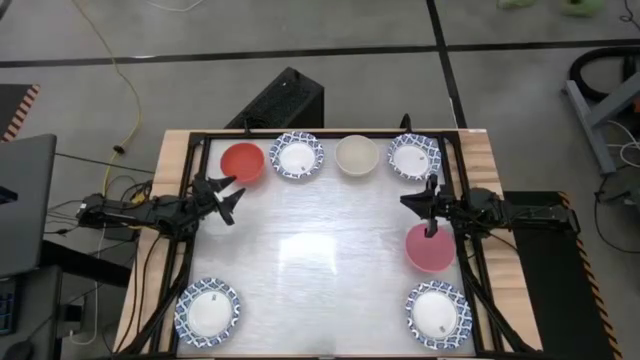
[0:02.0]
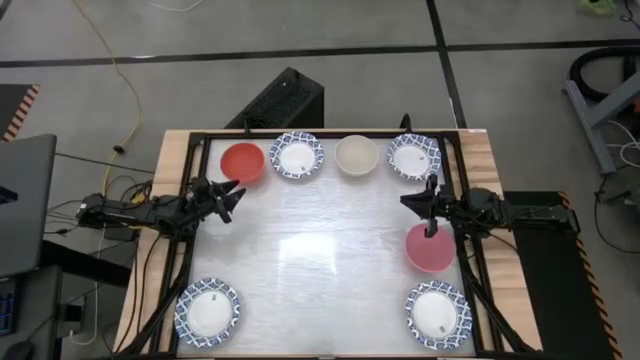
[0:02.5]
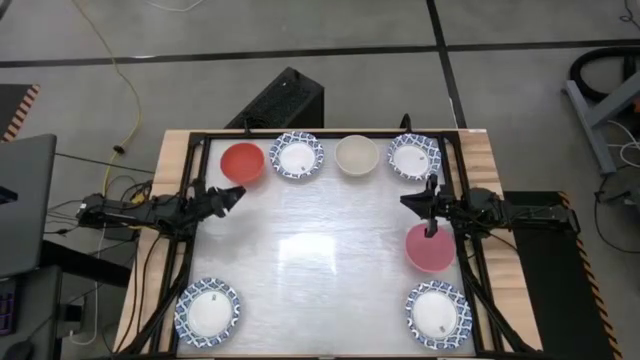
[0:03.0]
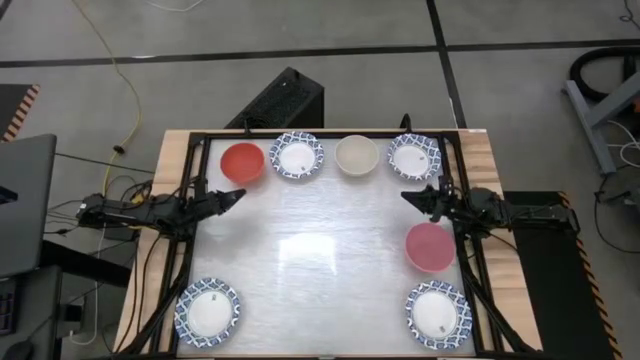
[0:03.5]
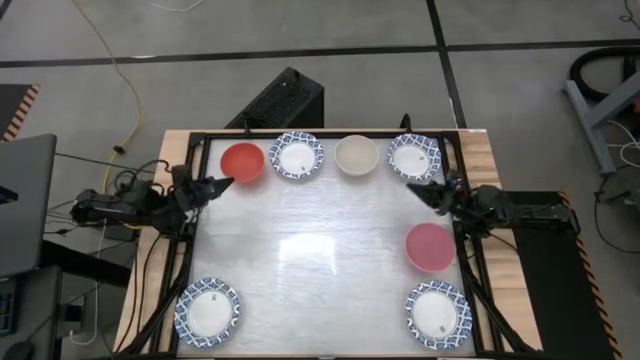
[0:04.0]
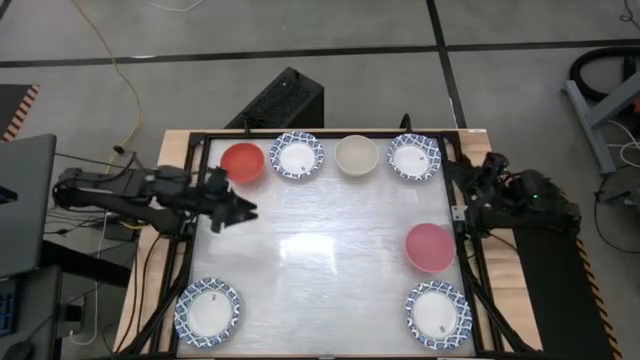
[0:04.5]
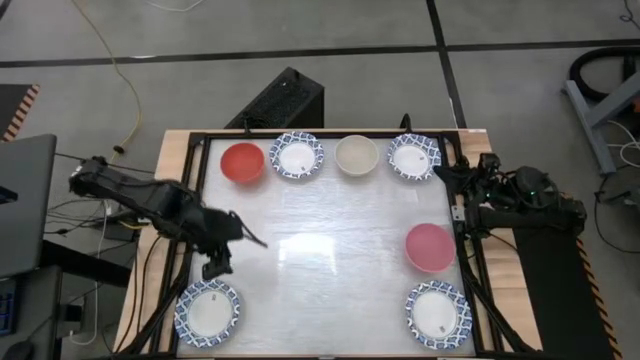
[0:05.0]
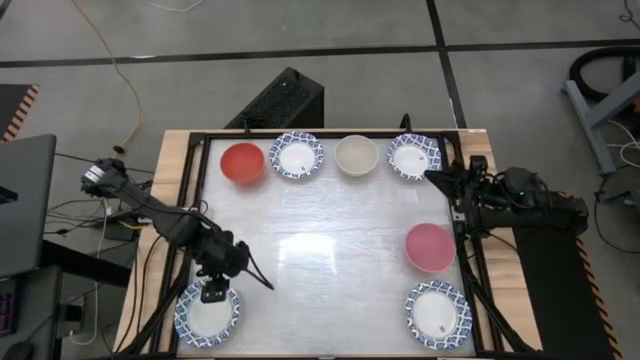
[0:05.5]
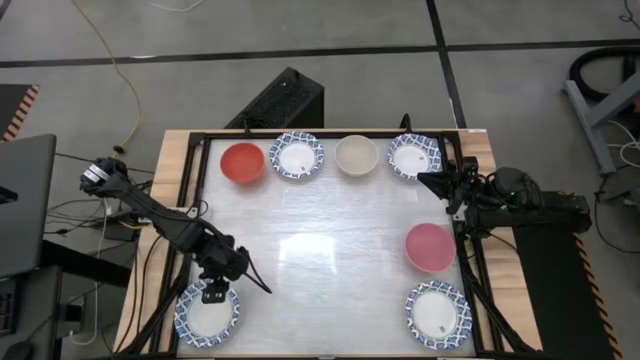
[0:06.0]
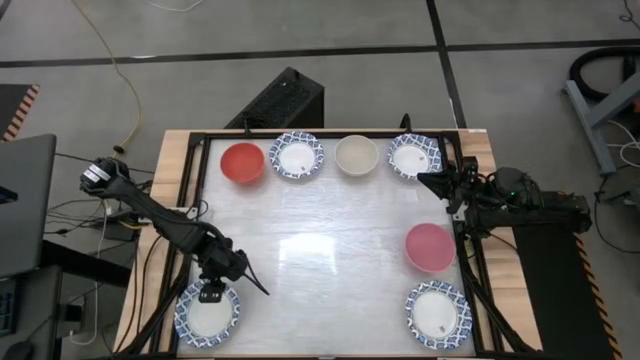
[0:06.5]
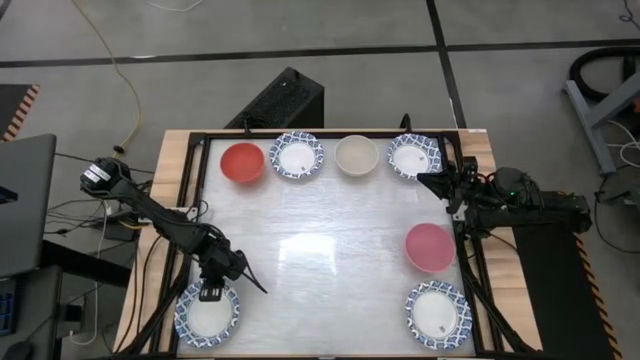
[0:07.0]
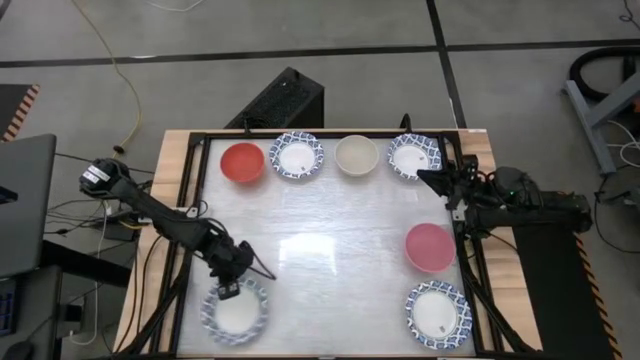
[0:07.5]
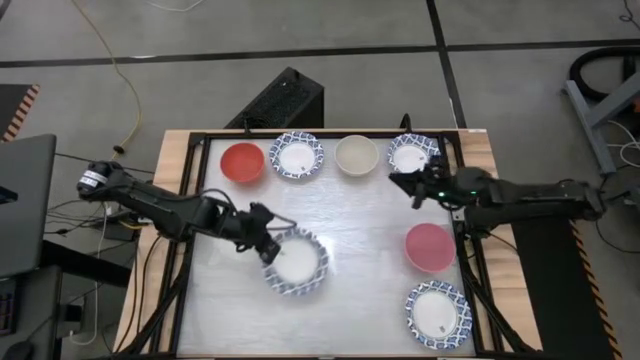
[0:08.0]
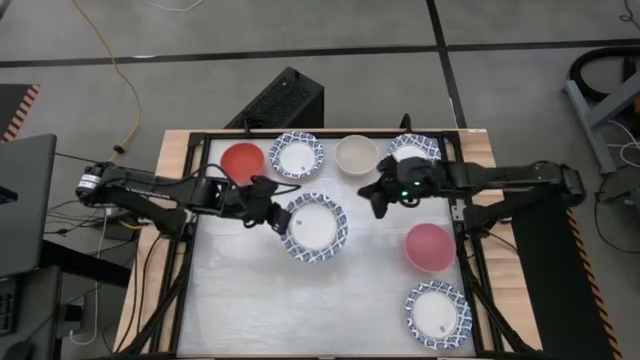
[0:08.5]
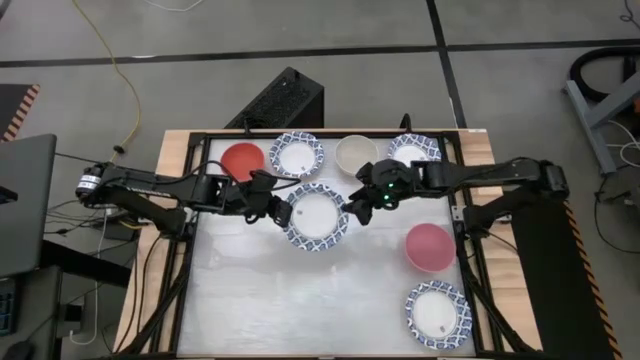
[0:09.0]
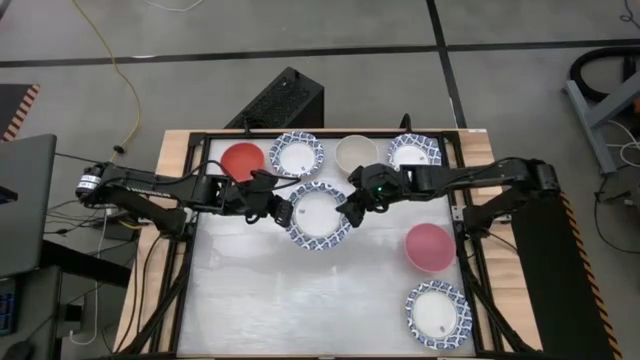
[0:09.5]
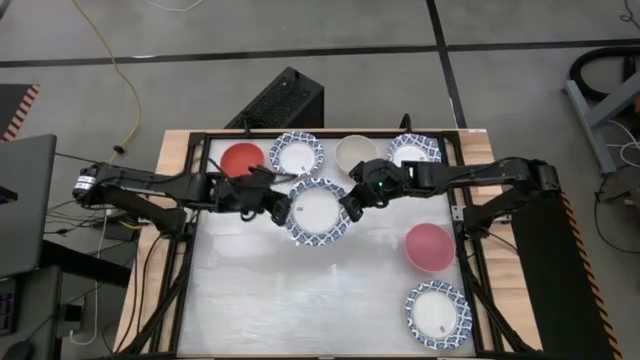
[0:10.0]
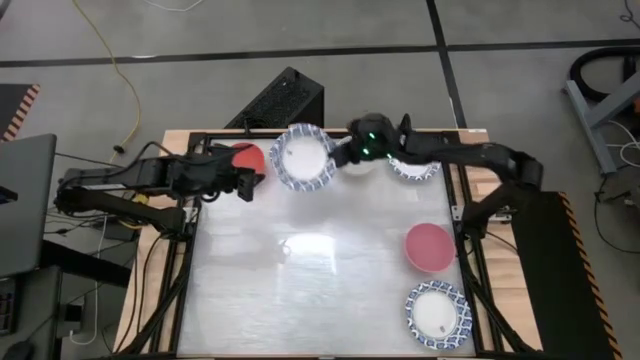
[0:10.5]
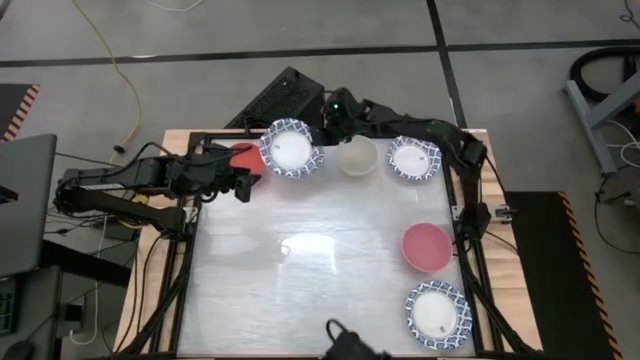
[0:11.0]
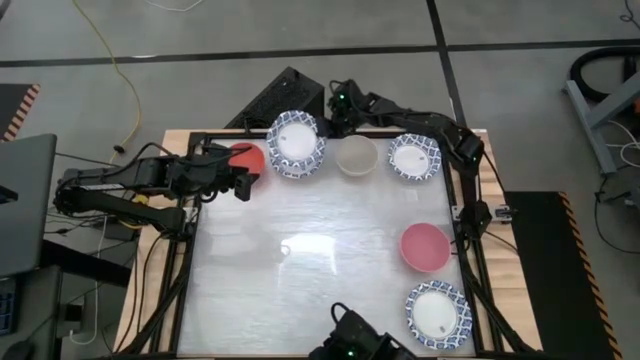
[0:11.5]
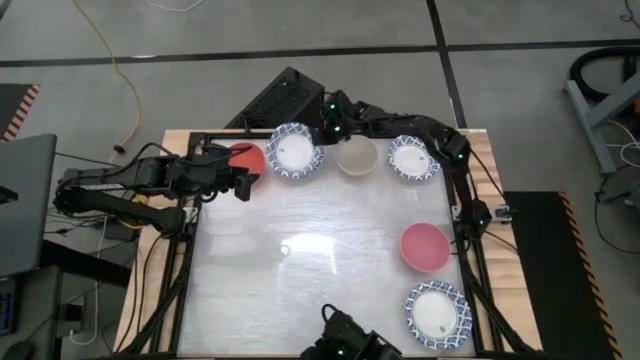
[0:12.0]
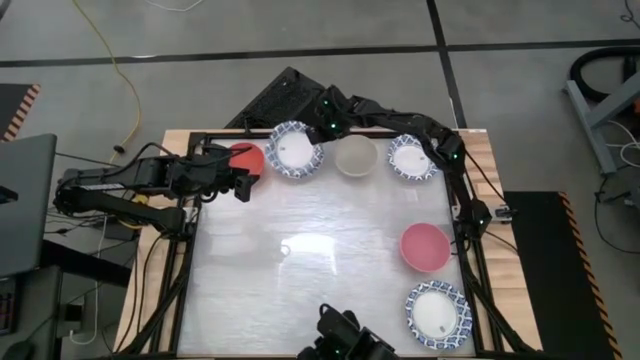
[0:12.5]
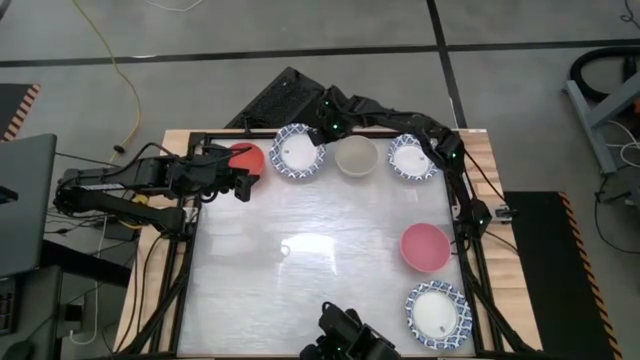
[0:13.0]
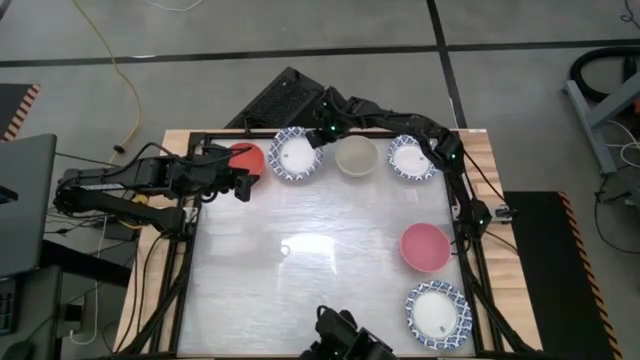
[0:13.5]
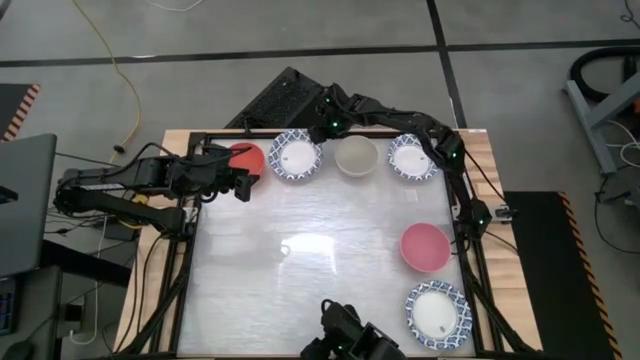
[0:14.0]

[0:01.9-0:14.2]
Stack the bottom left blue patterned bowl on top of the top left blue patterned bowl
